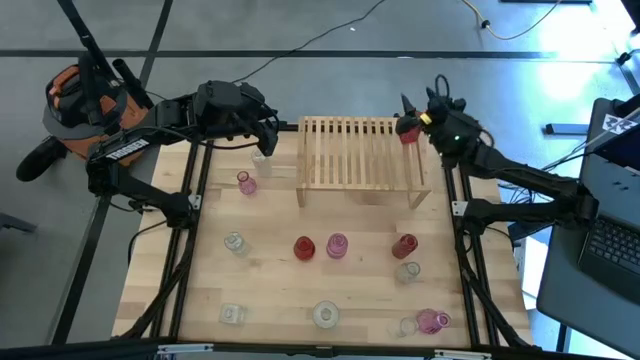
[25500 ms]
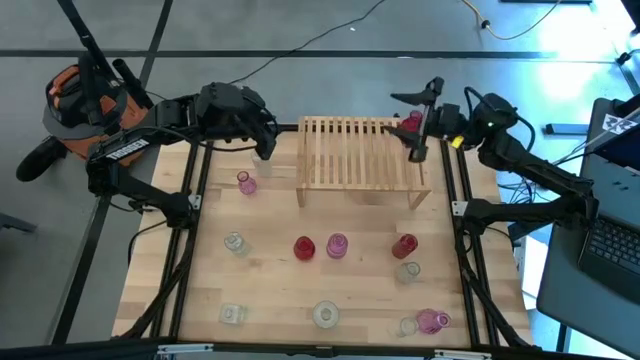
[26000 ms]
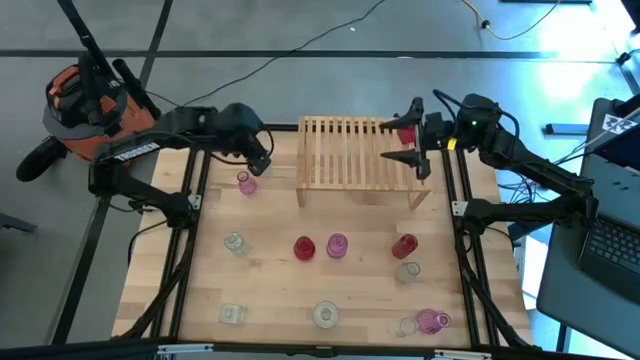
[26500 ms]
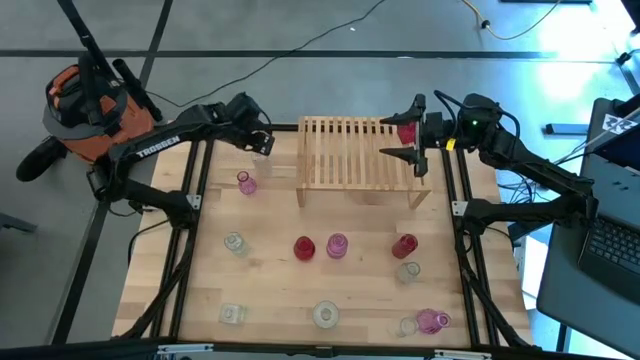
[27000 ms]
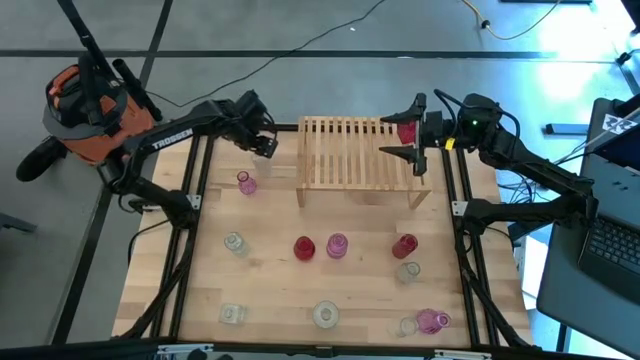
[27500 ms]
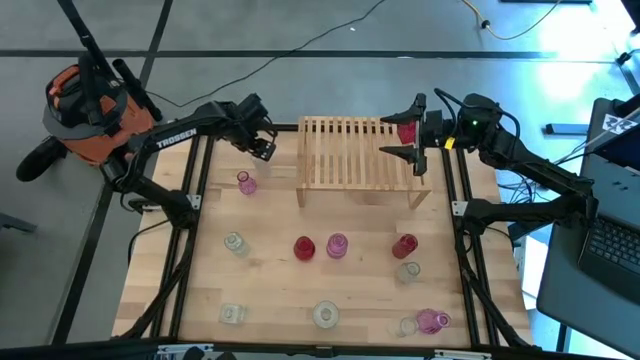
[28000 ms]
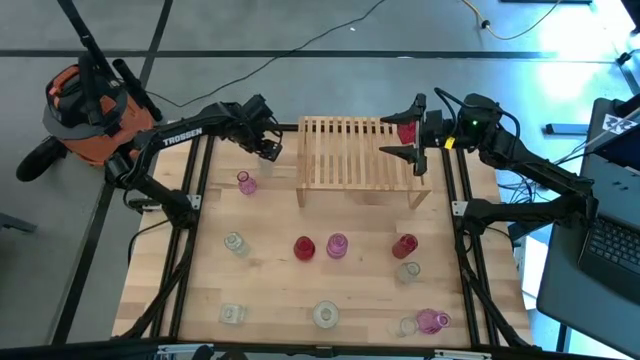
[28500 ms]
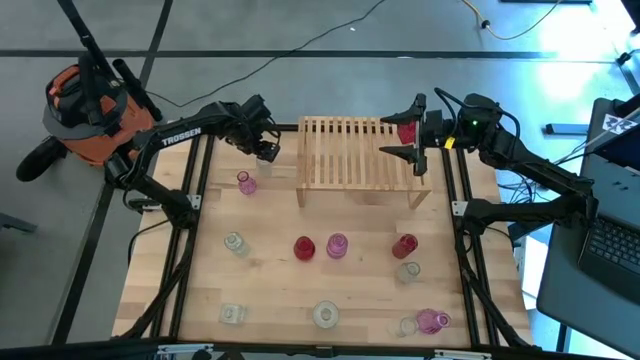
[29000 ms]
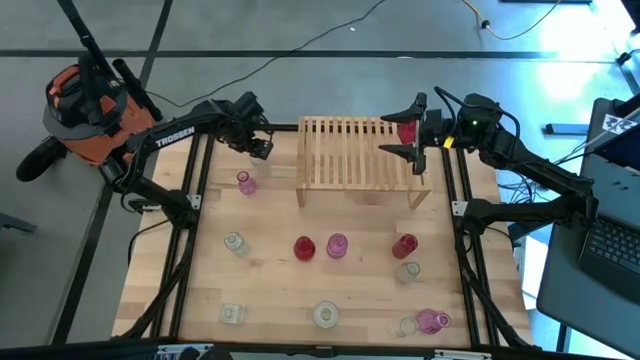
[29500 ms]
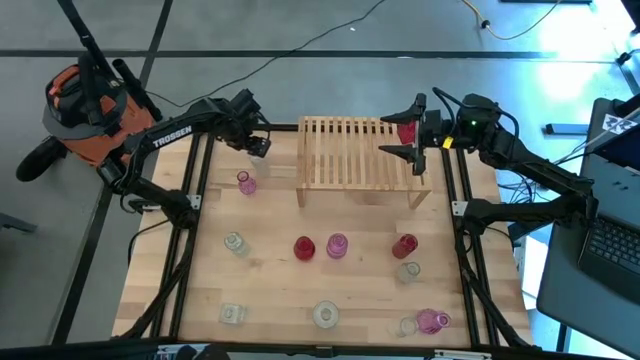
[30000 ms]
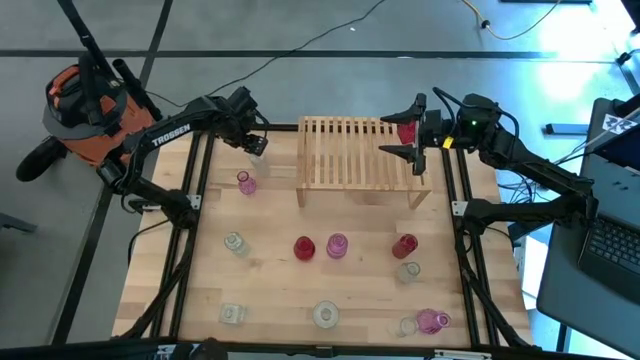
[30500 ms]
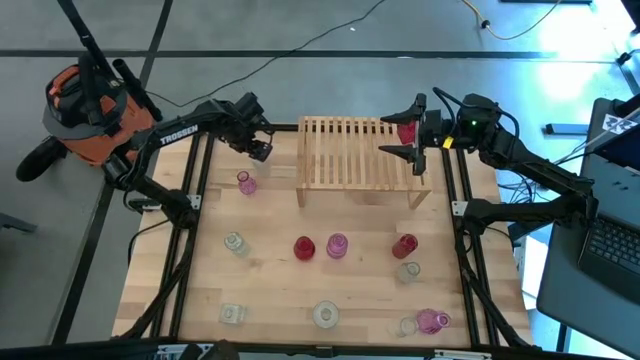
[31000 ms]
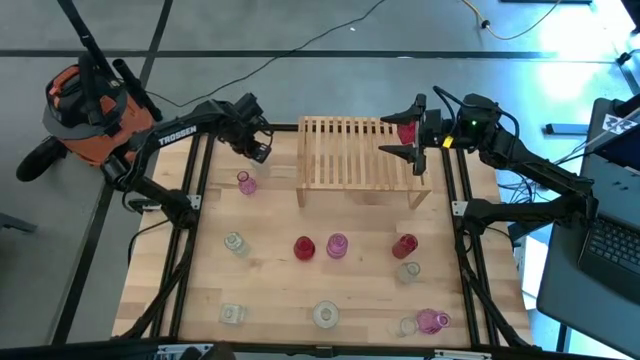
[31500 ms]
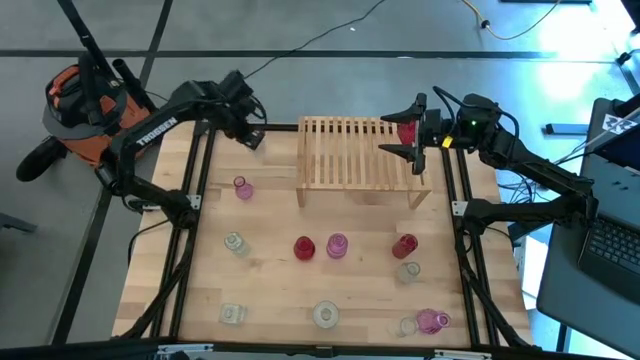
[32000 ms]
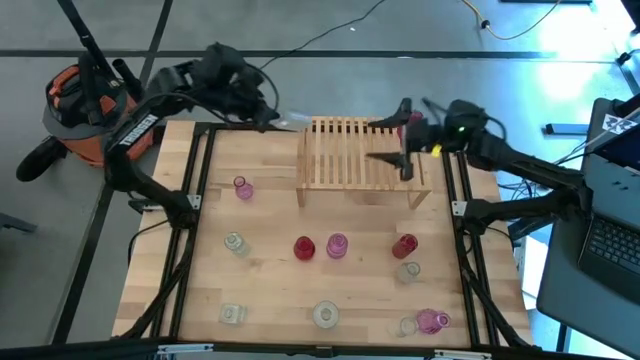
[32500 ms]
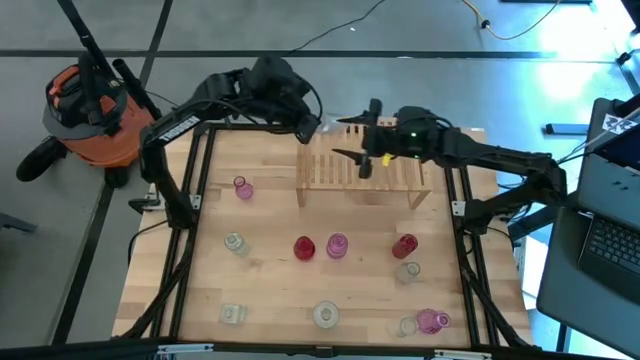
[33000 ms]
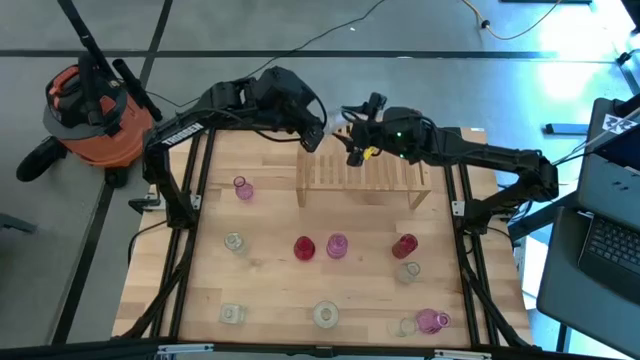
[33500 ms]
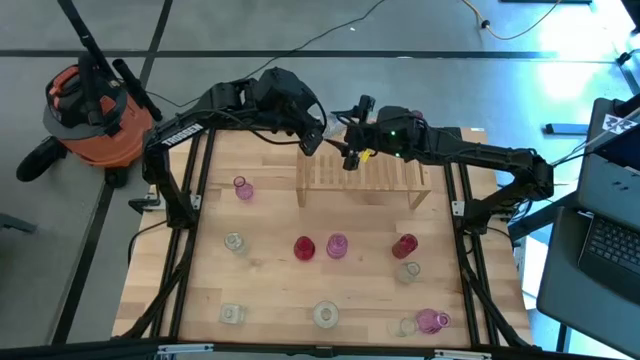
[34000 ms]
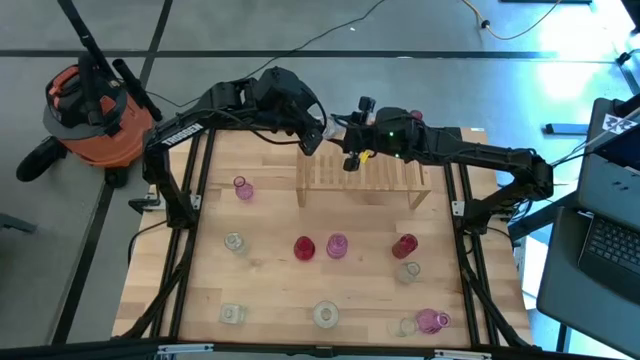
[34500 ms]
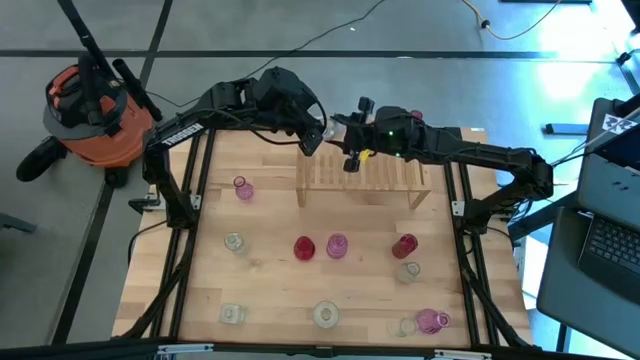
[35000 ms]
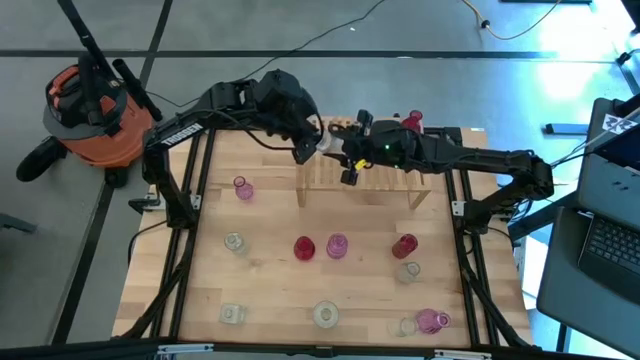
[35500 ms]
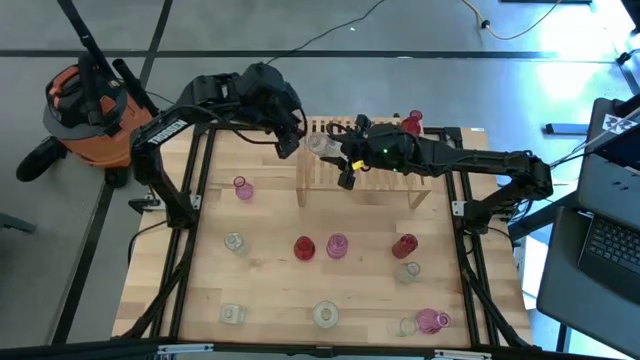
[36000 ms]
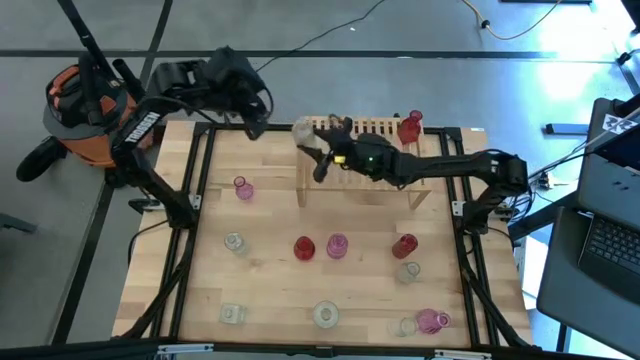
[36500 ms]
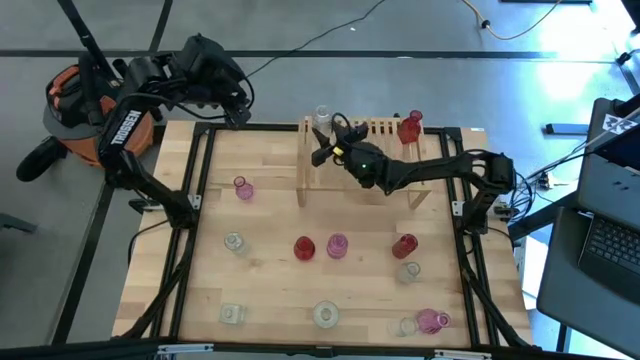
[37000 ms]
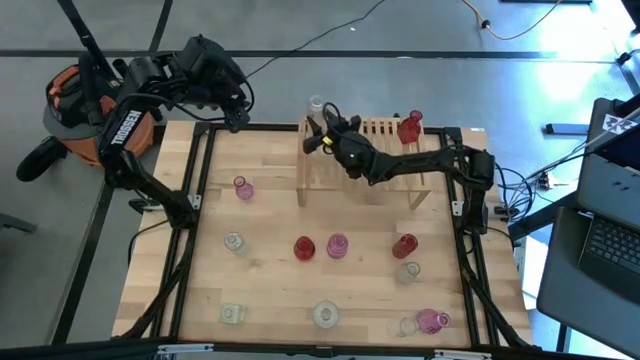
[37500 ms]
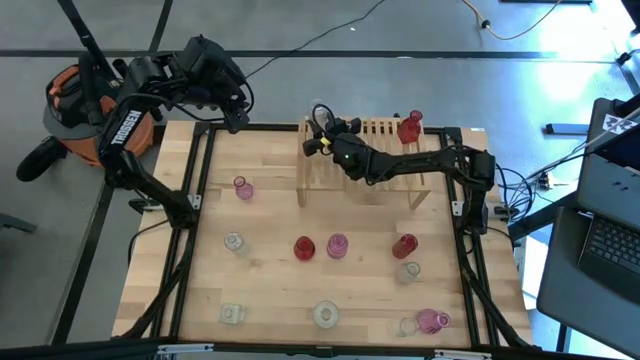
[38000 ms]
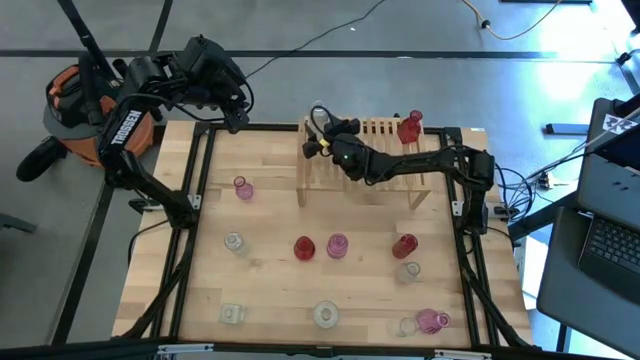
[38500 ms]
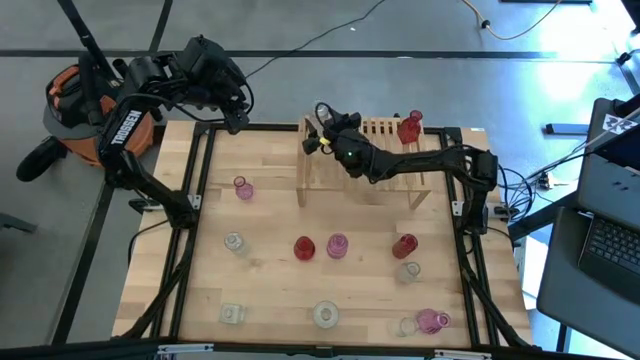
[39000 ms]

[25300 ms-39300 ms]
Task: sort vases onto shelf
Put the transparent vase on the shelf

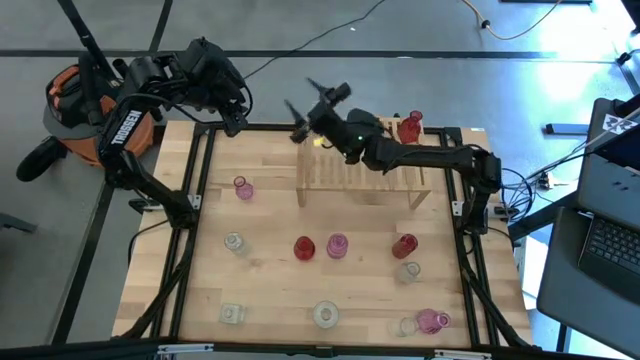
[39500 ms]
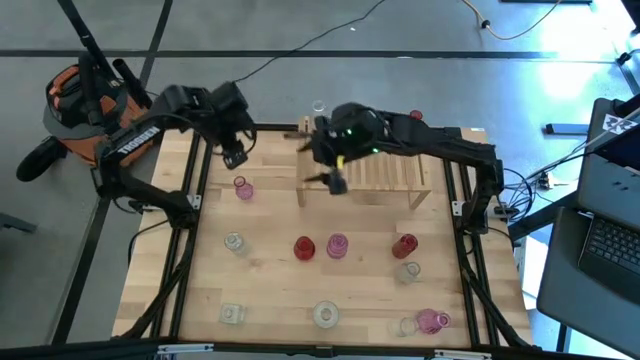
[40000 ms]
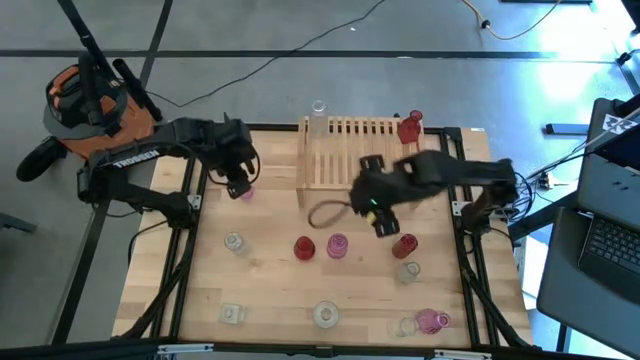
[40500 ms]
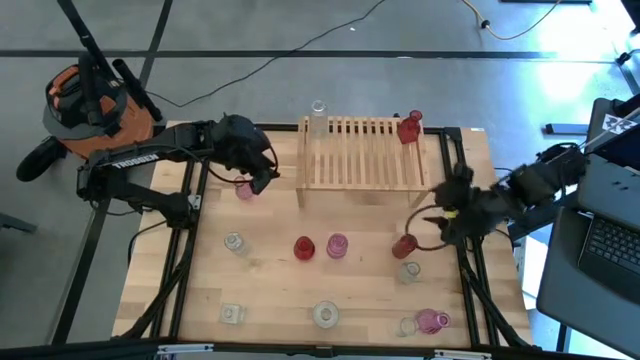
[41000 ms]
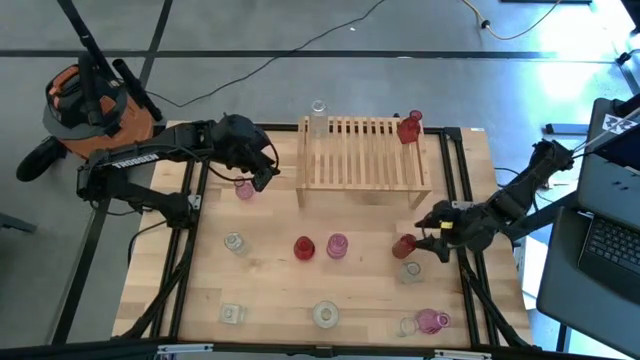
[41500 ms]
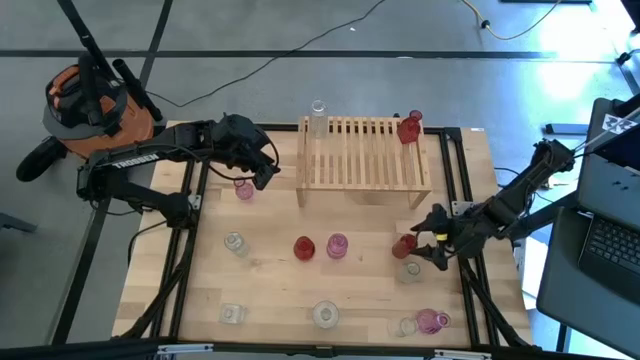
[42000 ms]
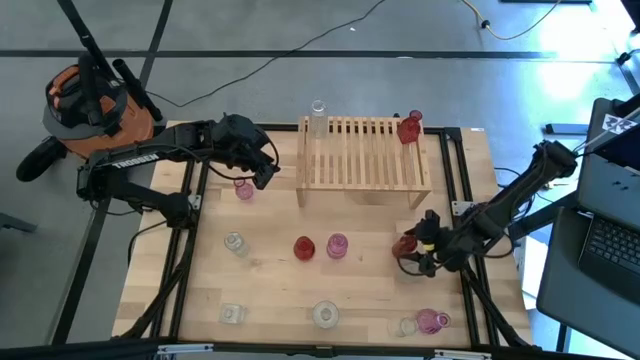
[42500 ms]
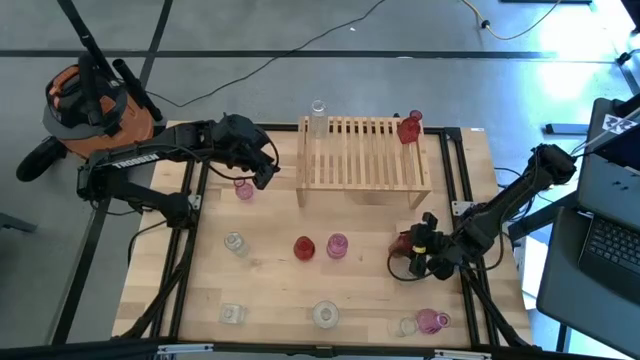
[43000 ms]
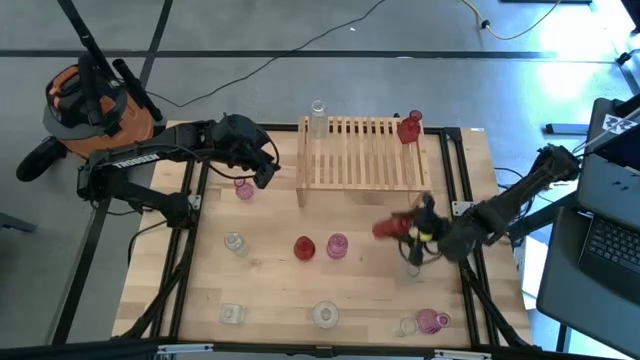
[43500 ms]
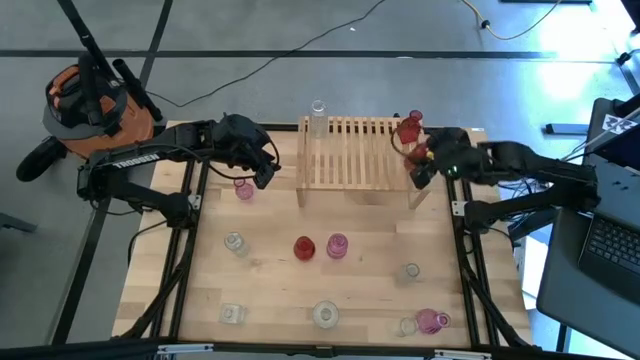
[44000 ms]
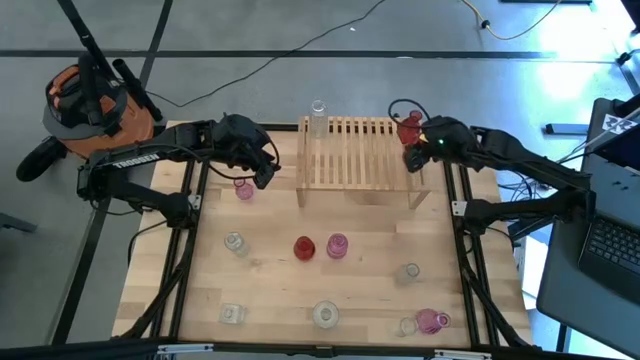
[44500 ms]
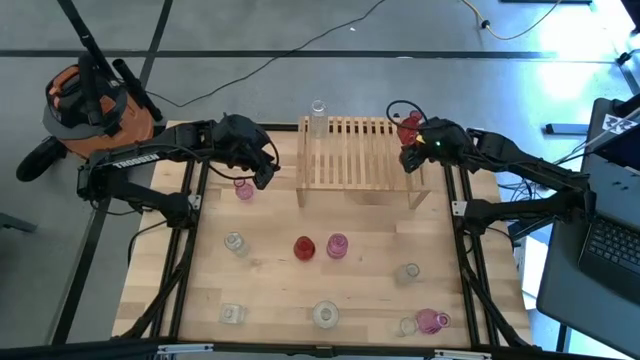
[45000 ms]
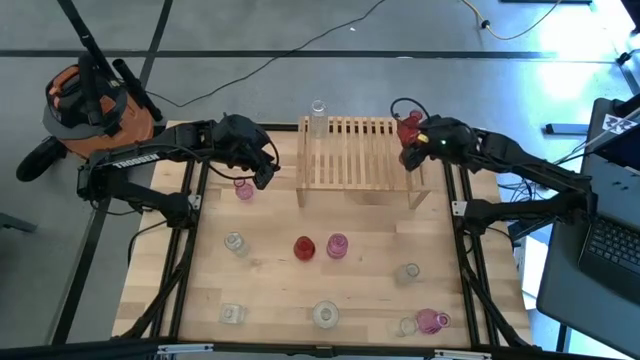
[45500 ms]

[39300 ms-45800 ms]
Put the right red vase on the shelf aligned with the other red vase
